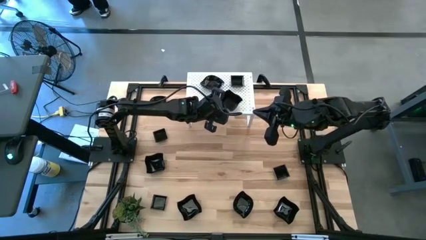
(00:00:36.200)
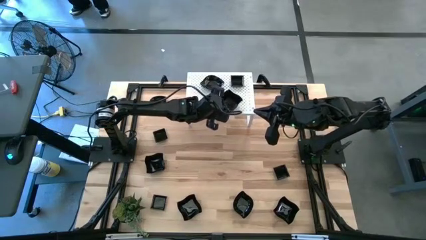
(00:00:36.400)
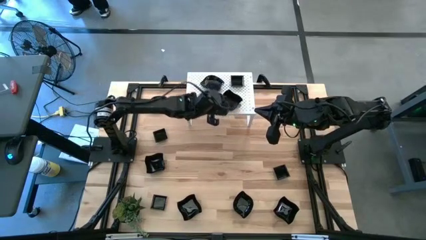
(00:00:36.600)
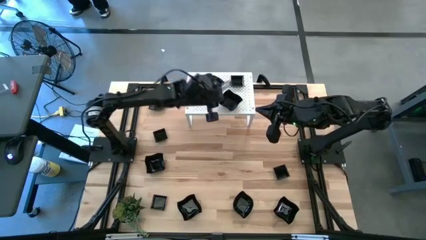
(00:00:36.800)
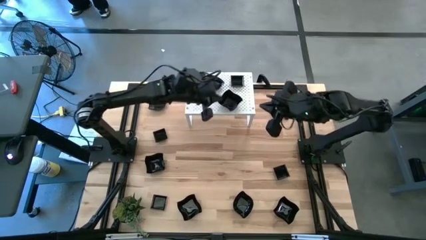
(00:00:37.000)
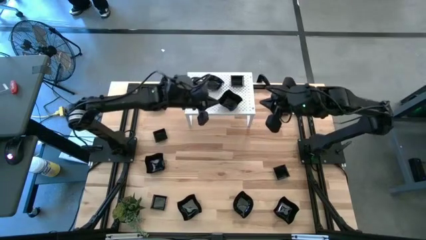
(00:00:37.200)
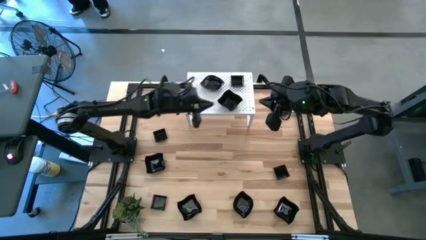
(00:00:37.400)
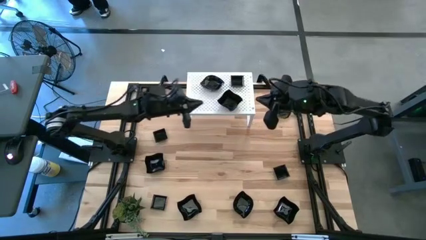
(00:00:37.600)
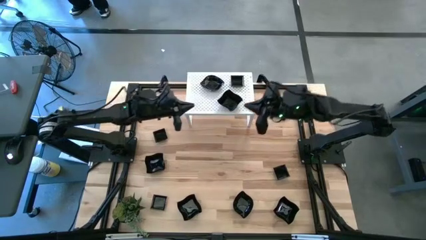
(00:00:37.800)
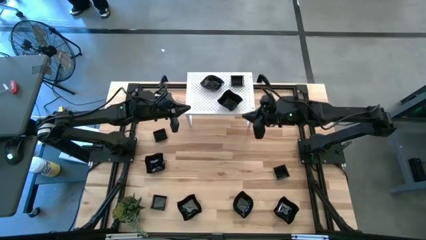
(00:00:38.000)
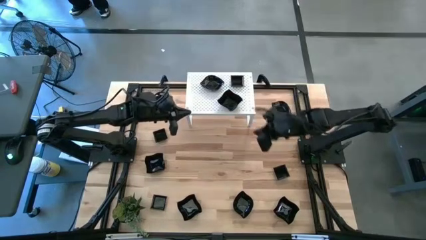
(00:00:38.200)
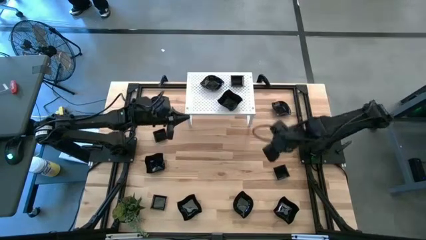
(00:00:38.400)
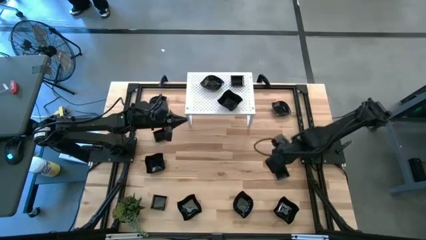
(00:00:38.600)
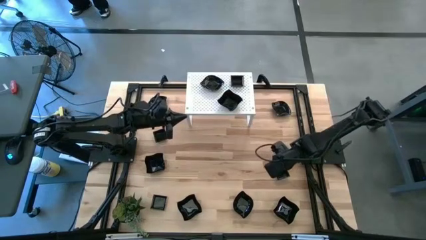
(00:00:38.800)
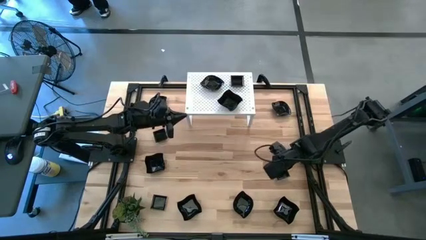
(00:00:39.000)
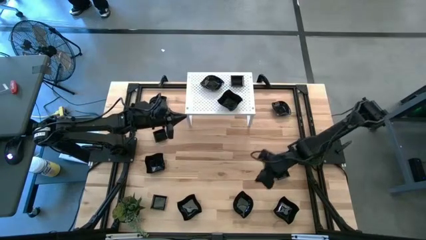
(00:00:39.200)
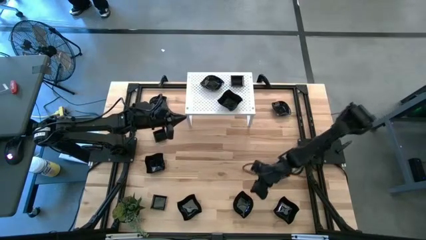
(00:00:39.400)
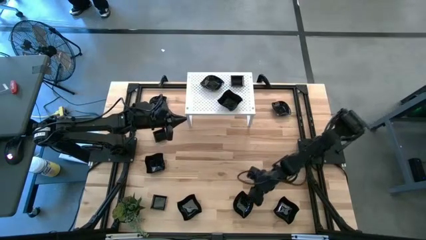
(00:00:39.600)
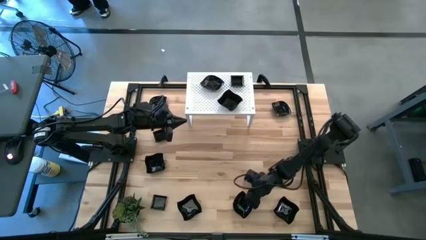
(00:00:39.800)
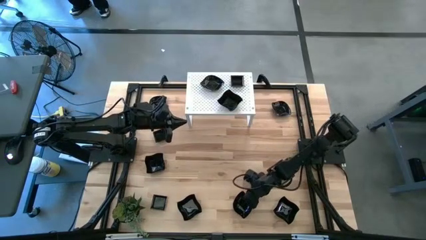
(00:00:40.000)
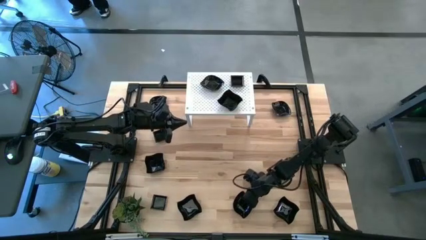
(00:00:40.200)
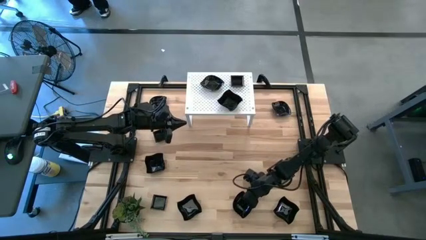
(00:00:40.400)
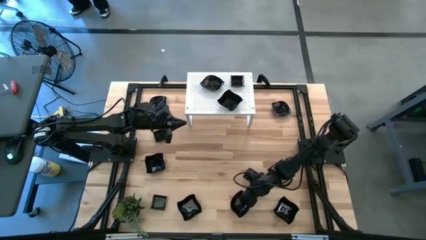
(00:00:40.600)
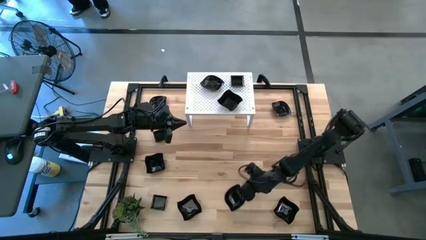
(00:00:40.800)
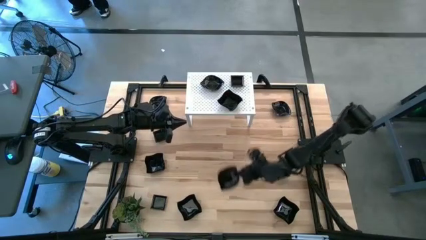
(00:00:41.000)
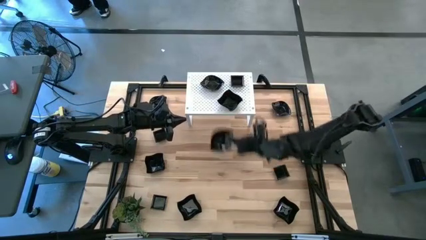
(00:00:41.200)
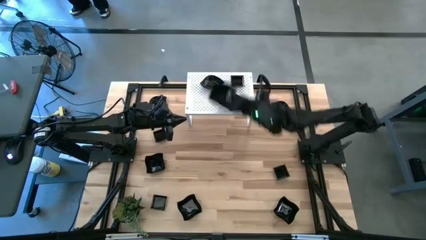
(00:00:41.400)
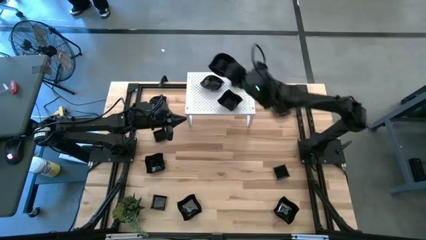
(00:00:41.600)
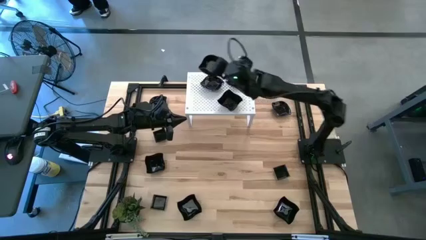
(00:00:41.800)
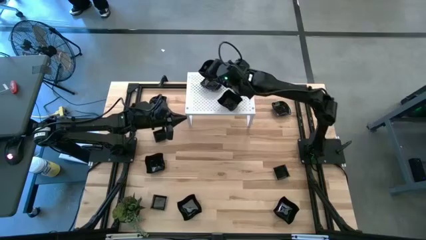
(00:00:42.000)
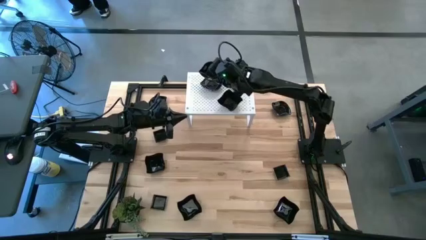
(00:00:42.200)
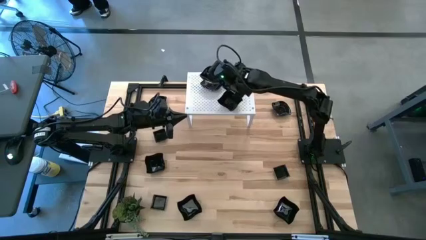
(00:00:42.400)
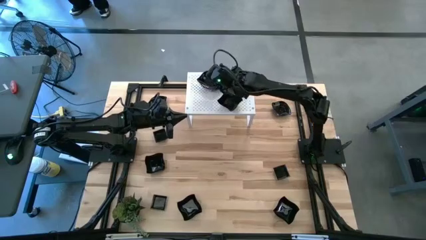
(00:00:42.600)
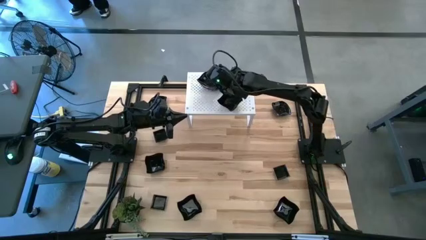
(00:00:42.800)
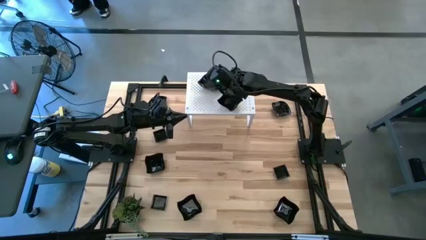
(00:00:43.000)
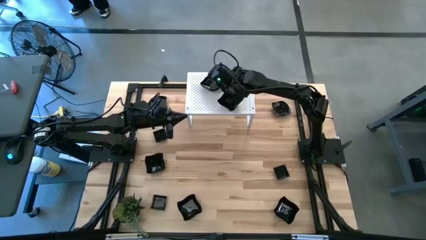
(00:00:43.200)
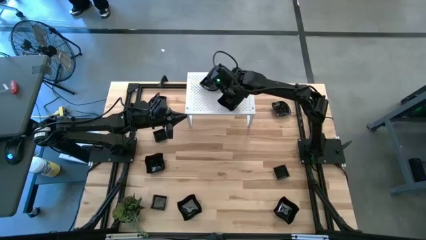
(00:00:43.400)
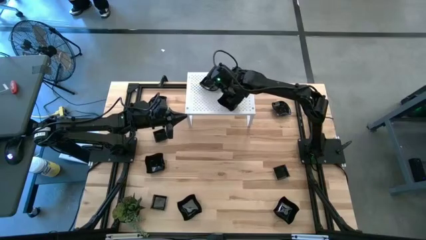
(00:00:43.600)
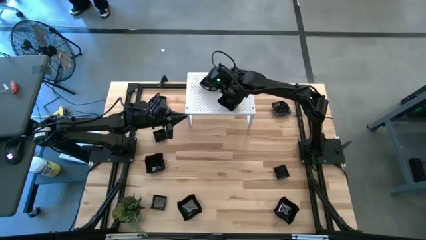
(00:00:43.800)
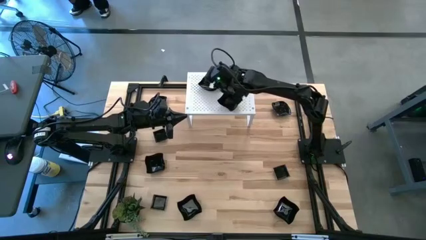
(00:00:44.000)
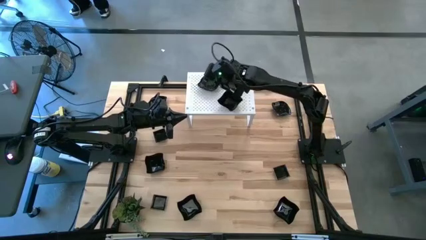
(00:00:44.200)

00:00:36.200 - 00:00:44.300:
Task: Pick & Place Mini shaped plates
Stack the leaf-shaped plate on top of the leaf-shaped plate on the shelf

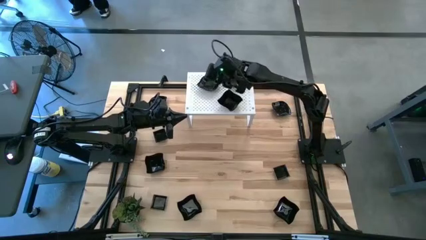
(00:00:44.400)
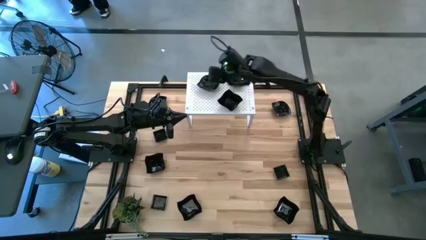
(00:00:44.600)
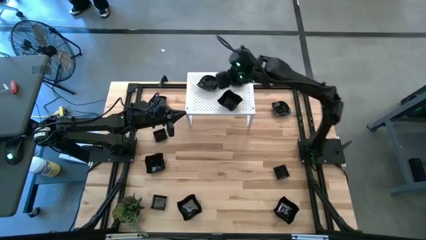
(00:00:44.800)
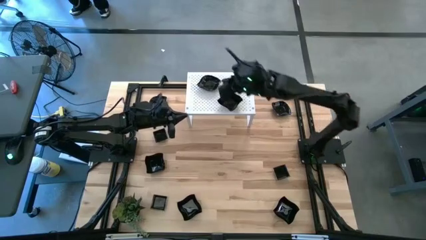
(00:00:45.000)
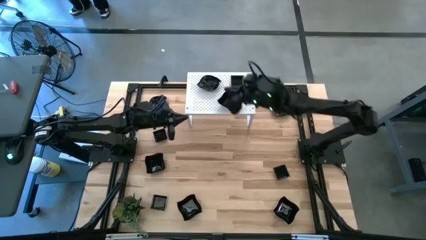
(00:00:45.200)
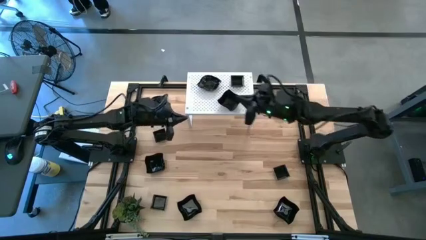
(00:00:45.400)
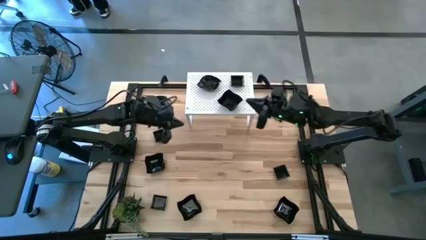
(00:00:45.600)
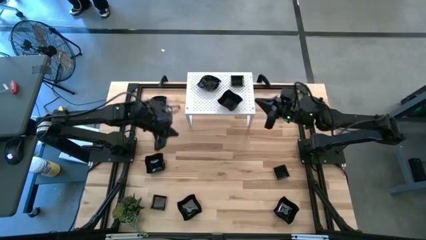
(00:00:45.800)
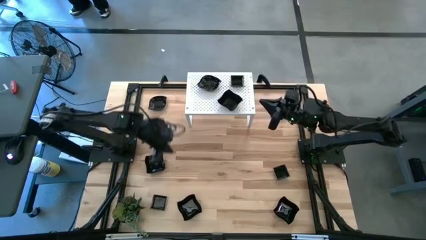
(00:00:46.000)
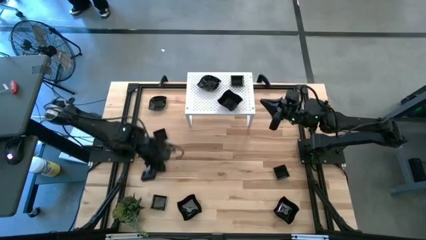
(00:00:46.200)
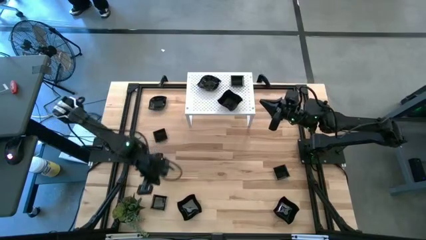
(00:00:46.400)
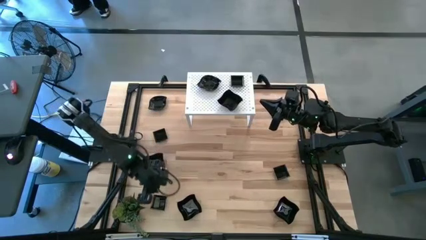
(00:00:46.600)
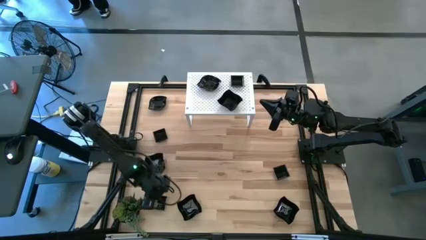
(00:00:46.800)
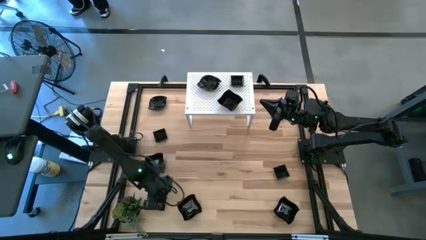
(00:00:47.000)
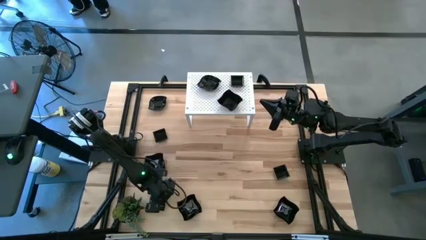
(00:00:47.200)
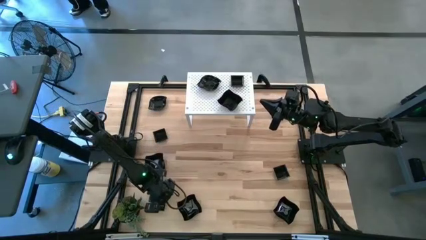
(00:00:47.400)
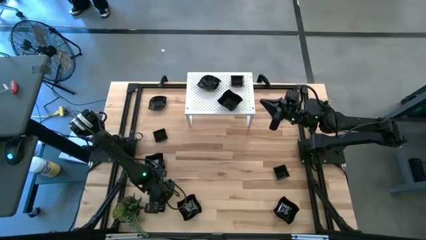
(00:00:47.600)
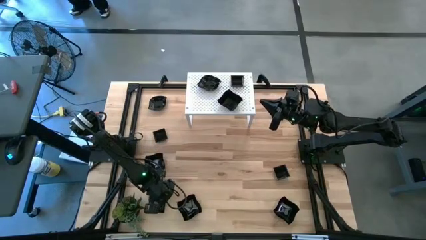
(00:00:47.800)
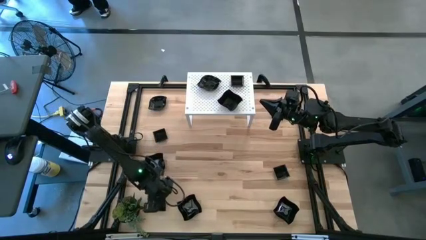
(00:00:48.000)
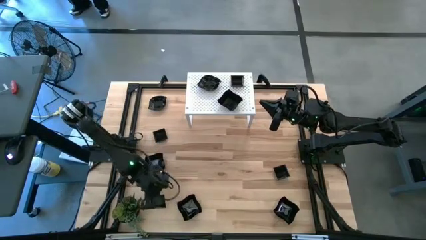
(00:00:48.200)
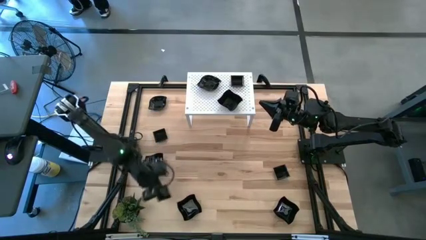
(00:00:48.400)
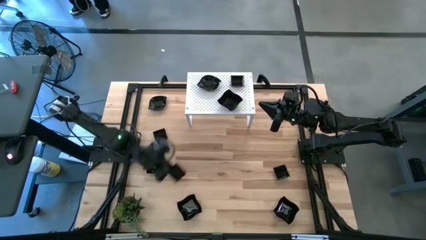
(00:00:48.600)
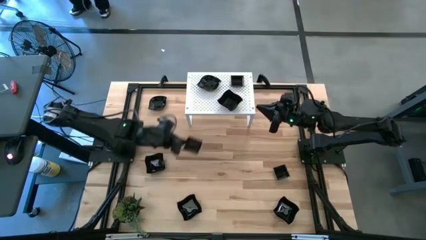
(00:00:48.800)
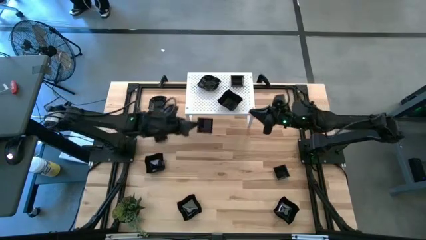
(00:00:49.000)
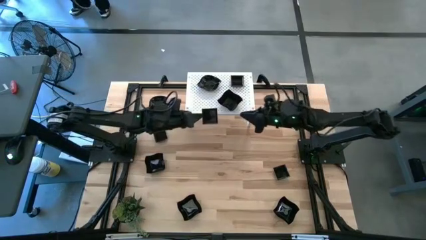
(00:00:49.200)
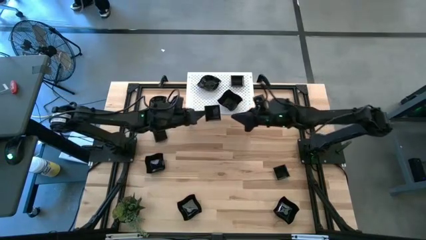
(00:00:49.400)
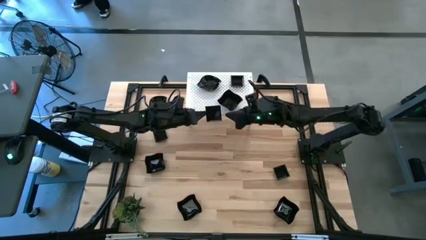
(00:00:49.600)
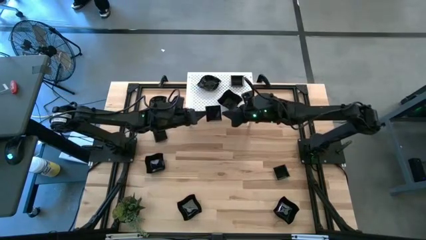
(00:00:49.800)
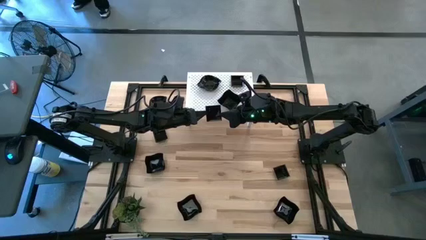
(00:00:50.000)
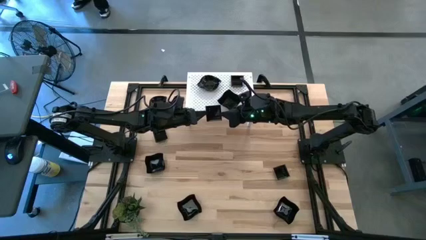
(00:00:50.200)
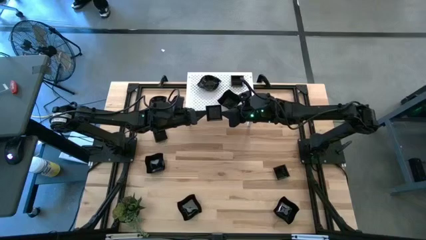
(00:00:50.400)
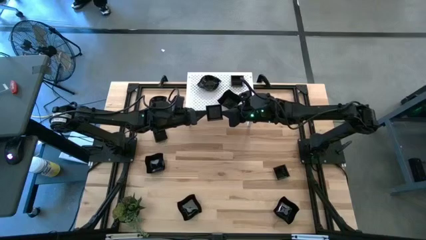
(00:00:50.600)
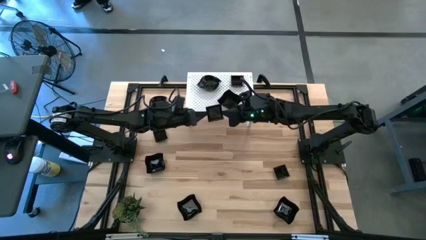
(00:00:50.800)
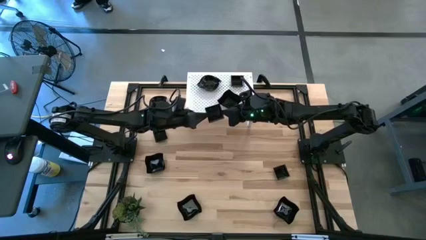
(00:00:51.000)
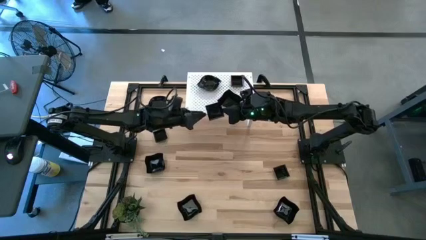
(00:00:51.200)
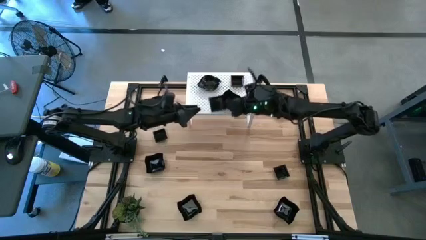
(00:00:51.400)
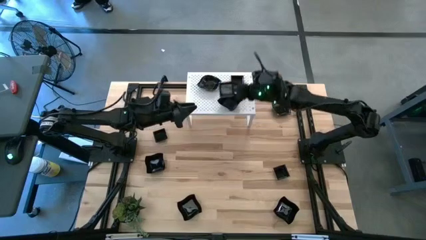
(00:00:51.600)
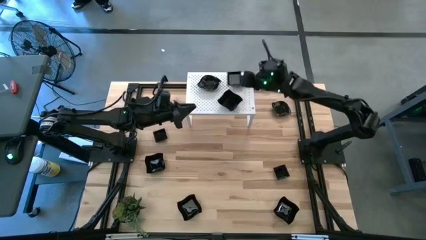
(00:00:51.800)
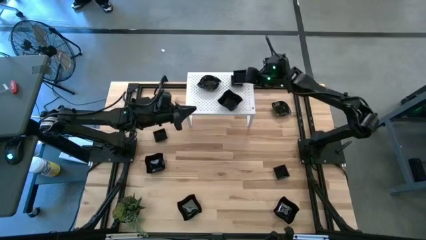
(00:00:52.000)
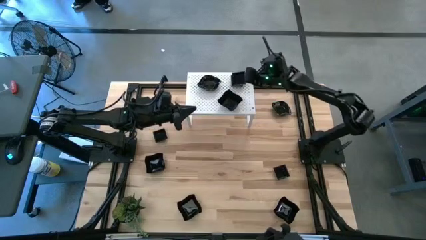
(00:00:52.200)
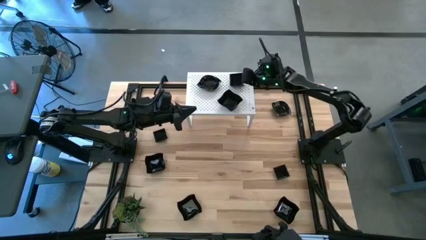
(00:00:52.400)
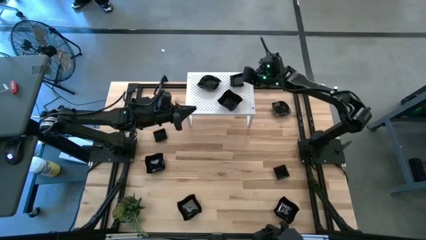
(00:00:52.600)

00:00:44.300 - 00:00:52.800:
Stack the square plate on top of the square plate on the shelf
